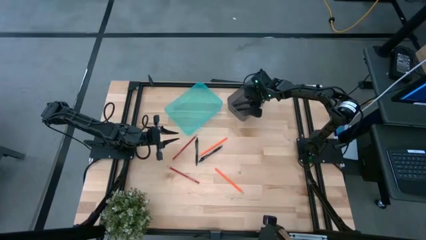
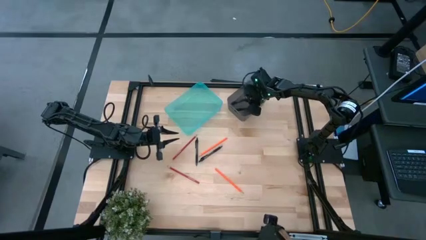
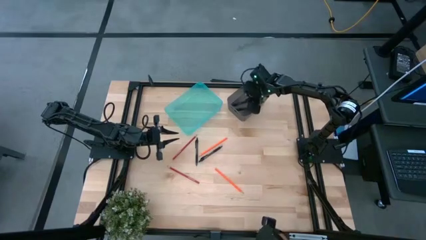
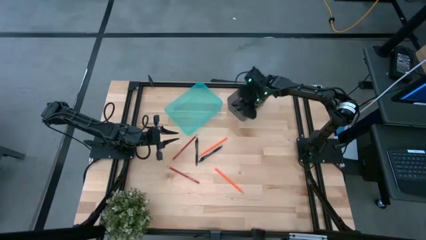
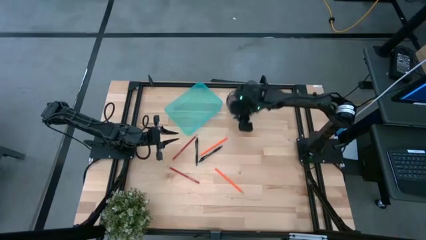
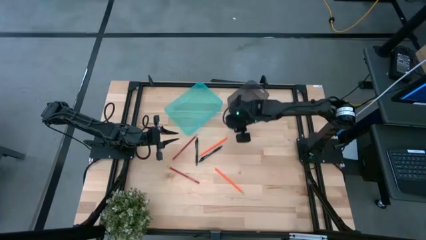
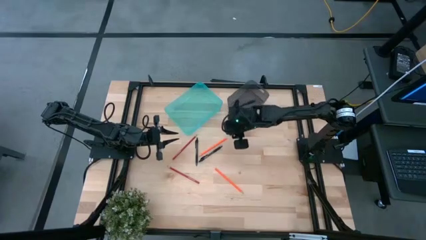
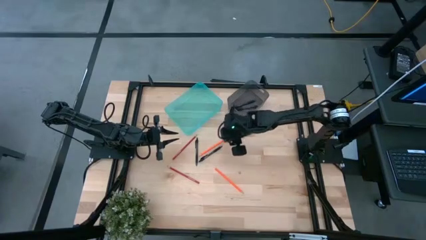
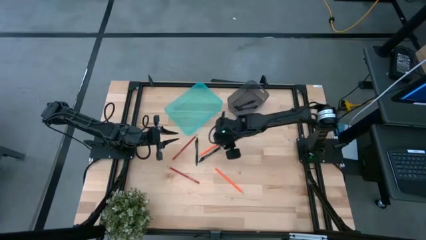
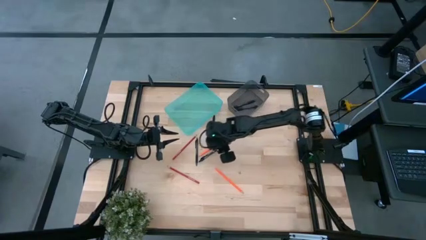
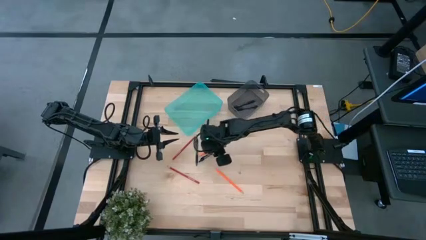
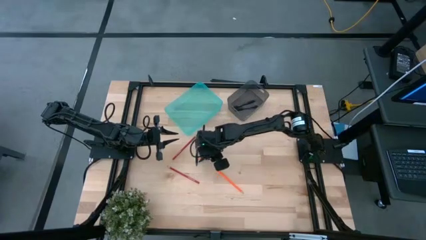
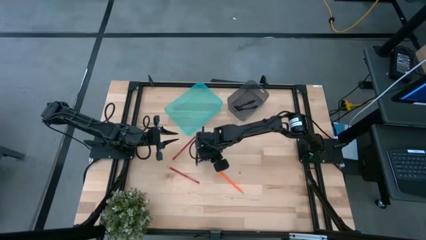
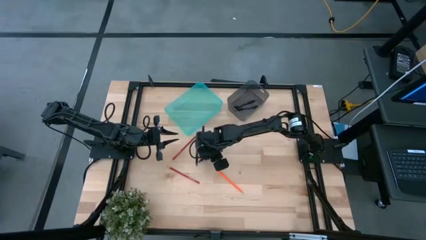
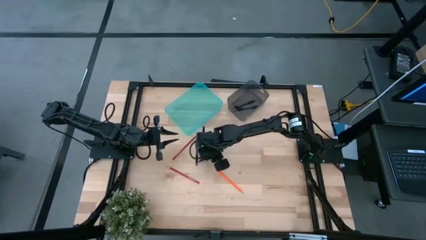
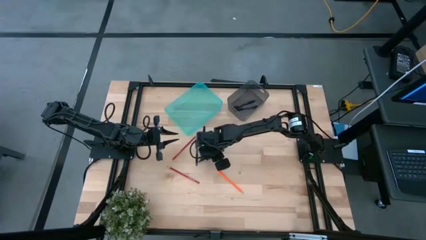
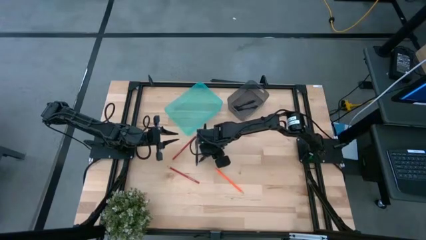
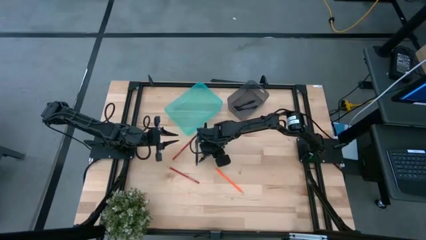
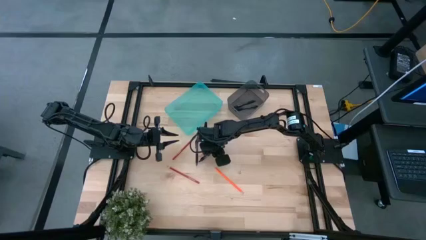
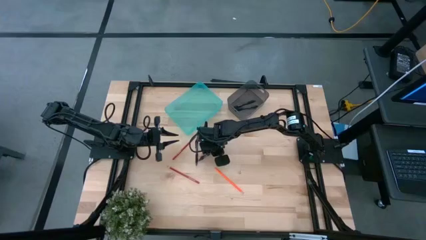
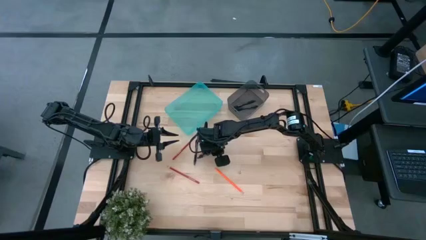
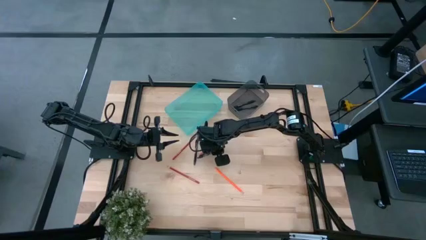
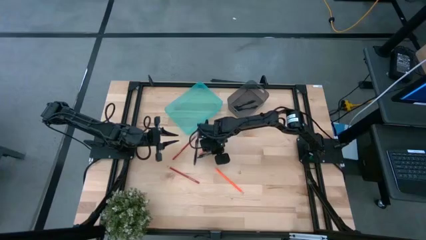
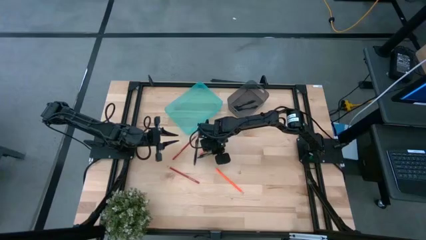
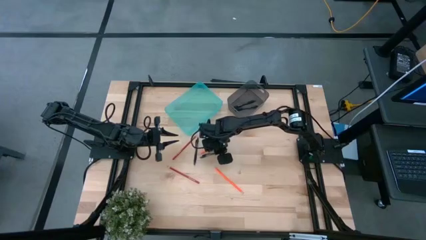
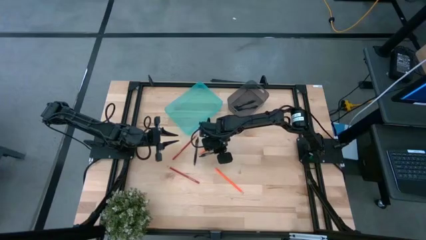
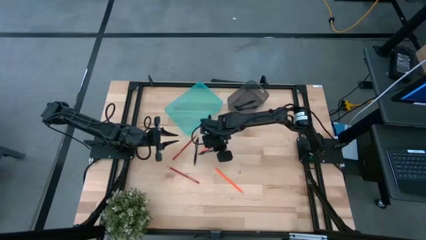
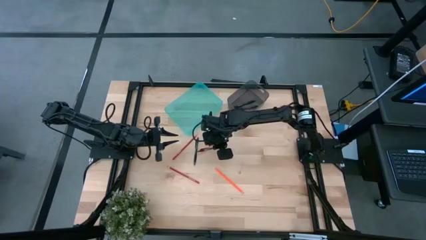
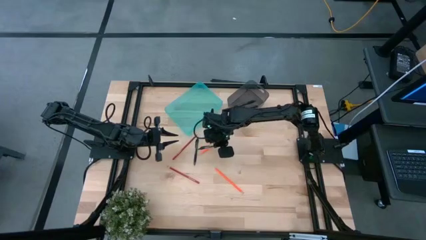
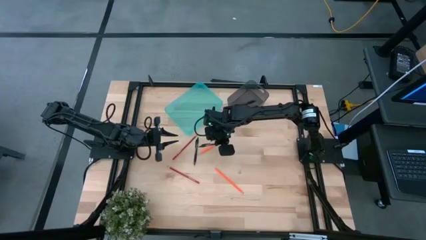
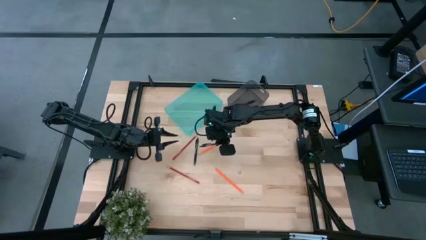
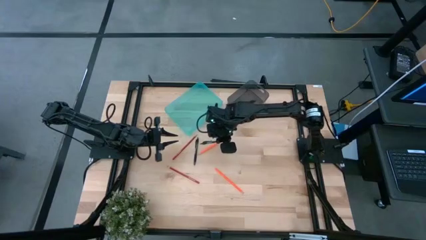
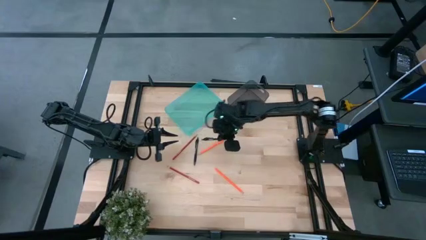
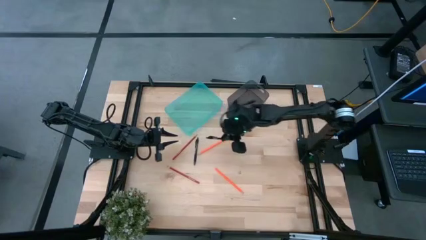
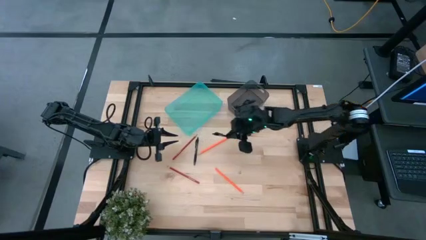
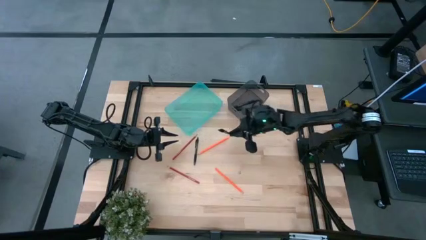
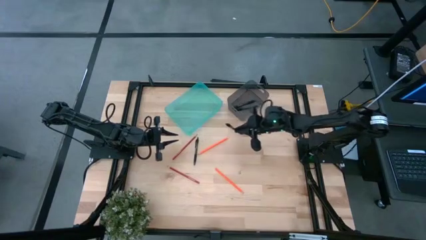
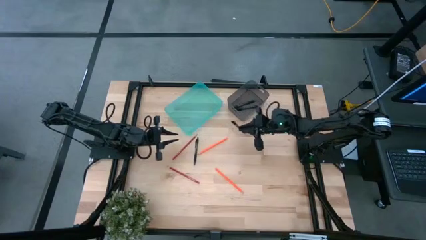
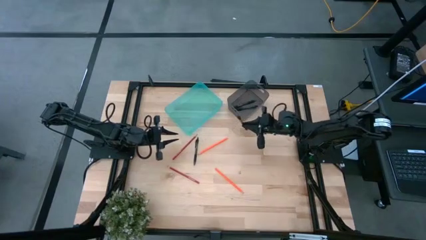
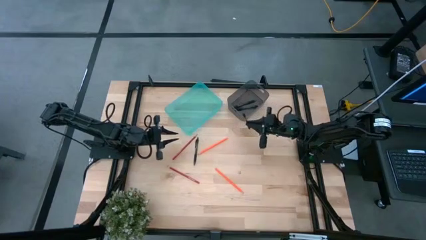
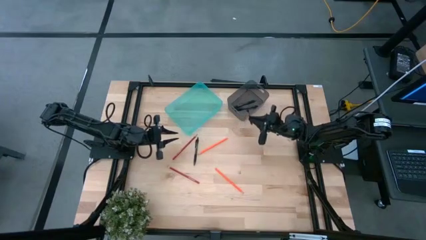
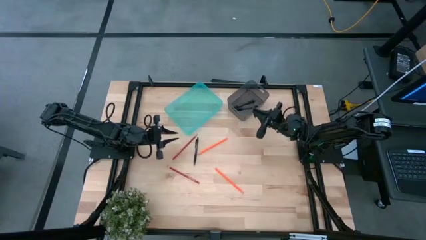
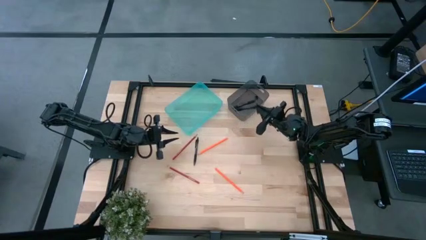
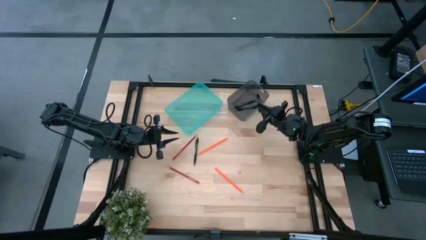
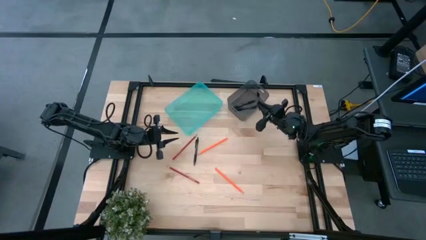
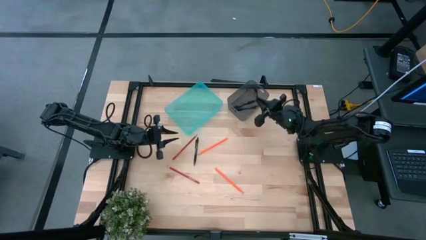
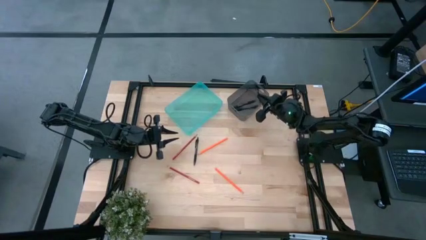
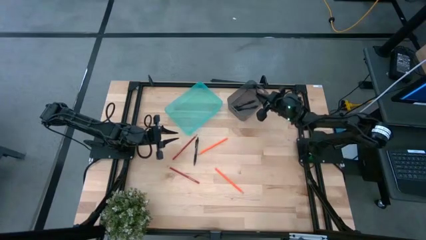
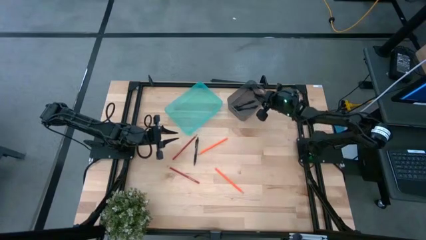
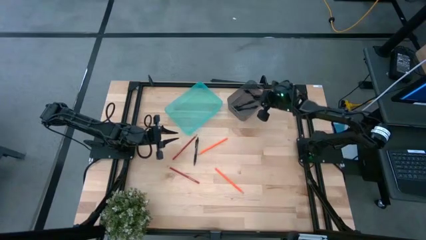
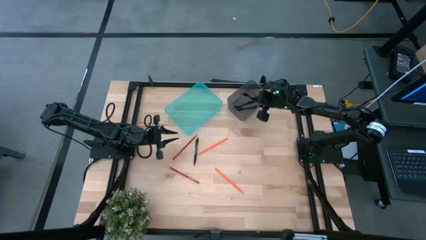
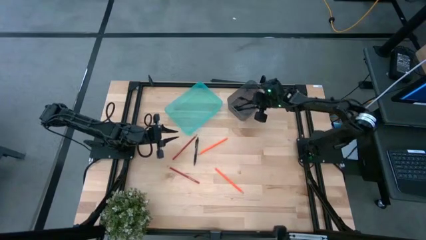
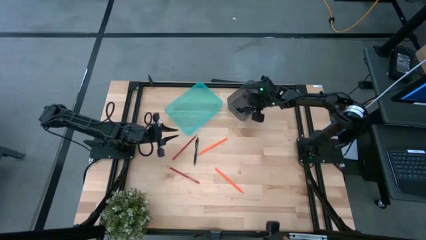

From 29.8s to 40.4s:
Task: Sort pens & pencils
Put the black pen into the gray bin

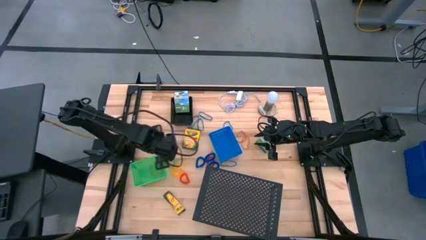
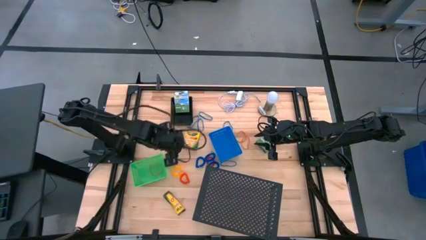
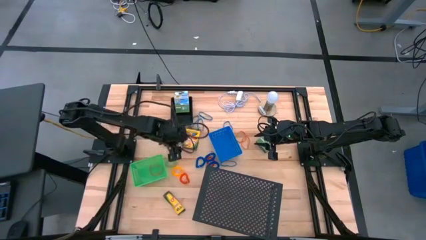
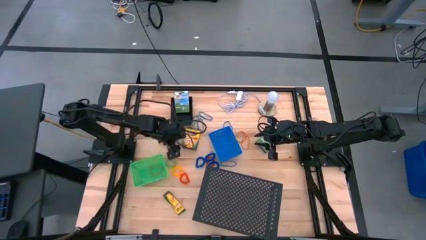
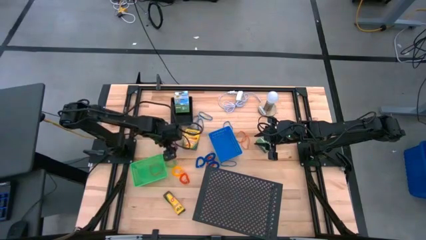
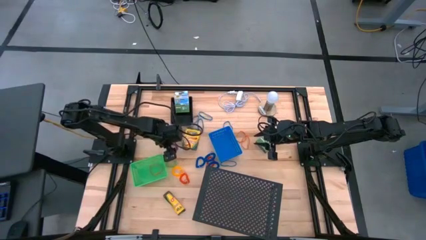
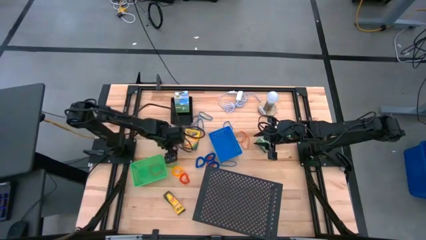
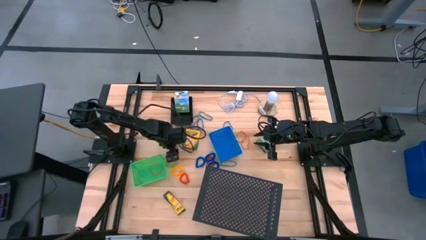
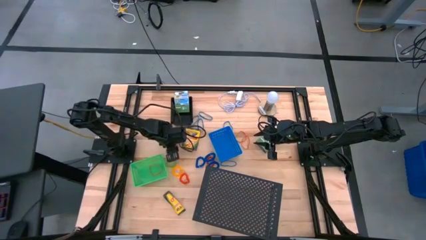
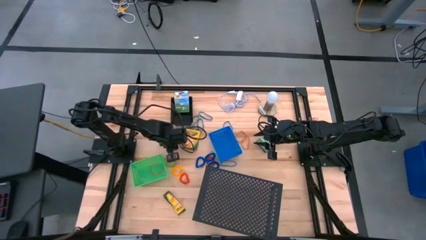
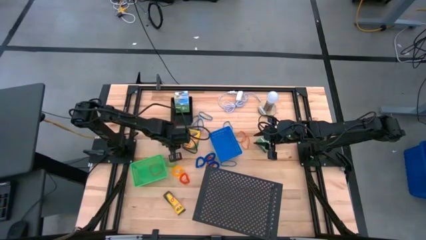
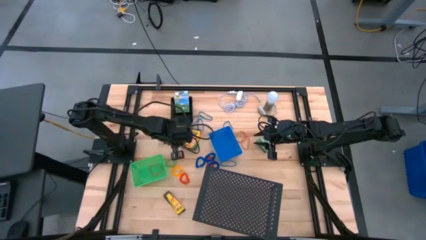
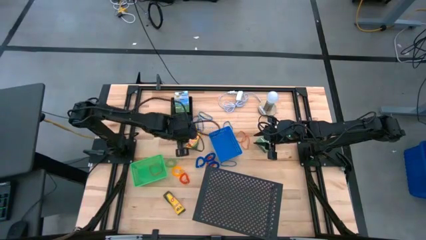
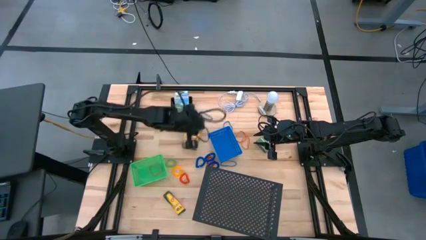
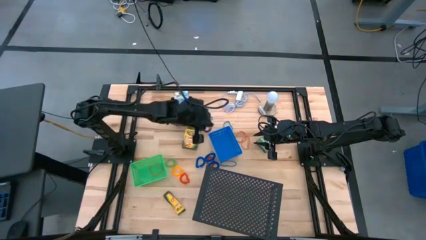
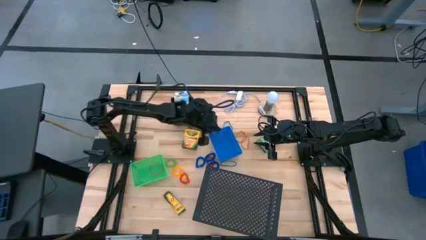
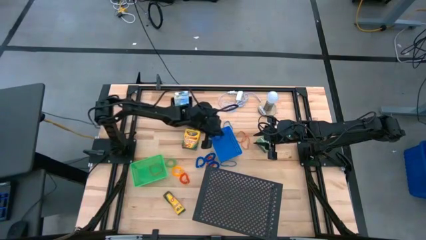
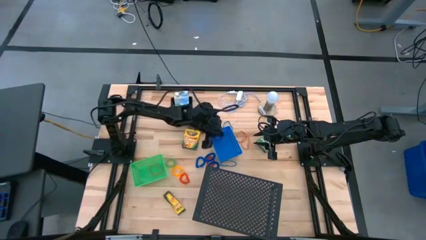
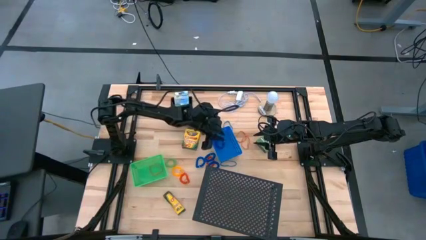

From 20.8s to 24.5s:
Task: Pick & Place Office Desk Supplies
Put the violet key band into the blue bin

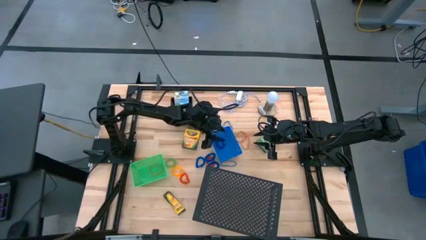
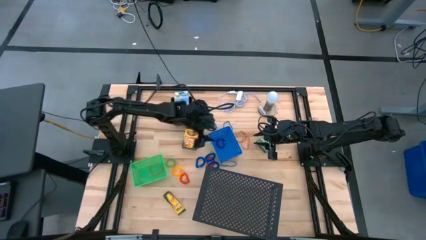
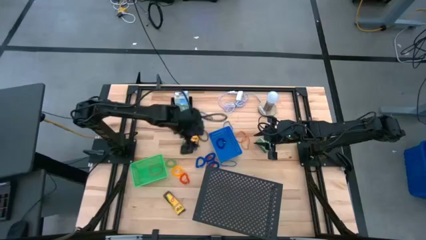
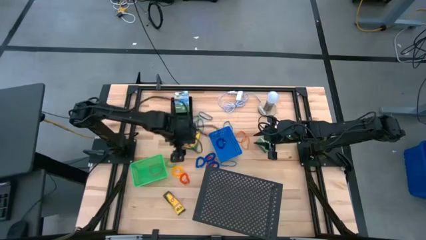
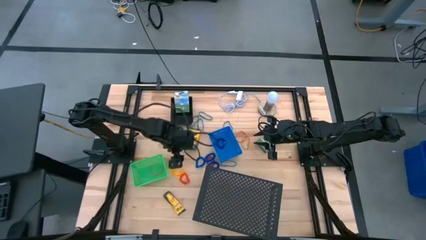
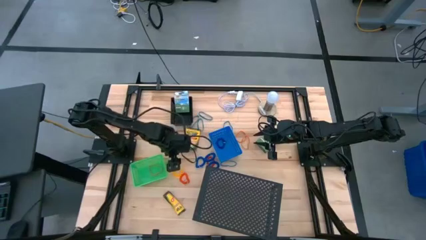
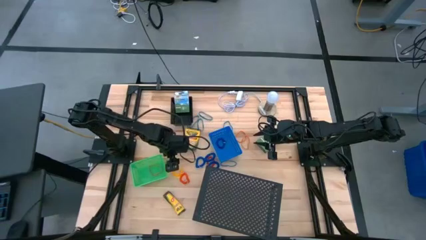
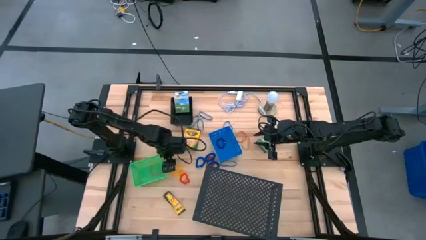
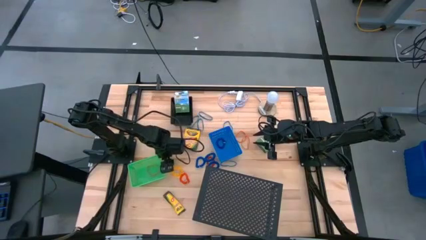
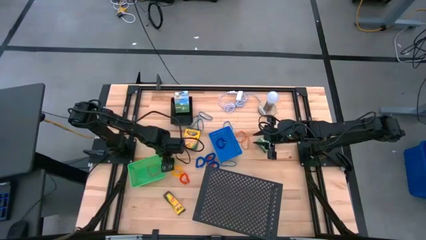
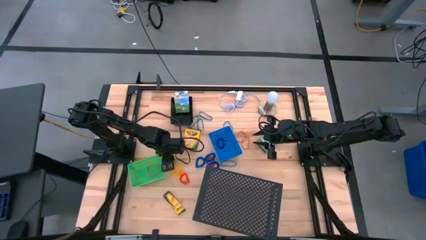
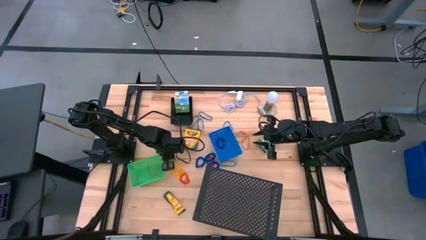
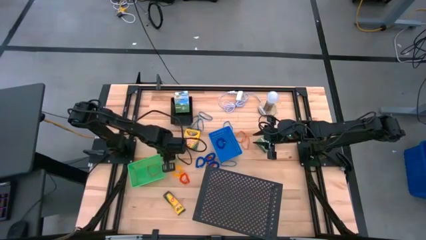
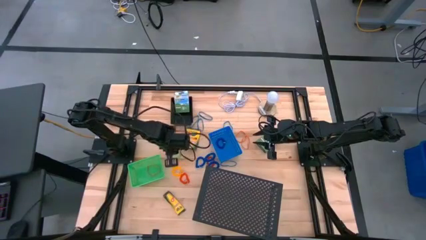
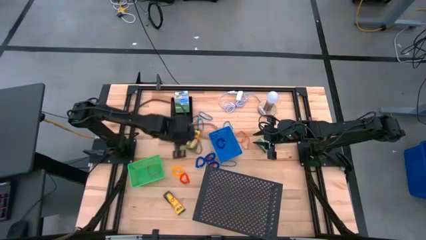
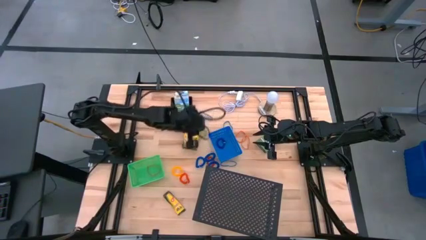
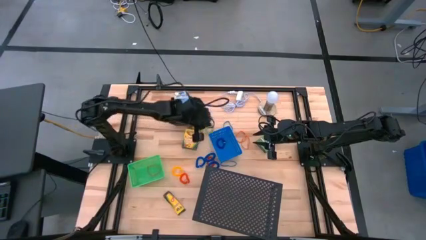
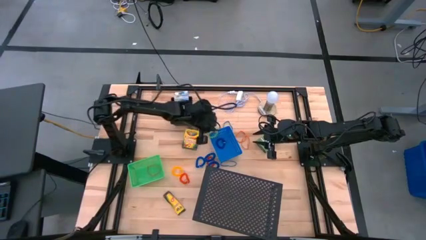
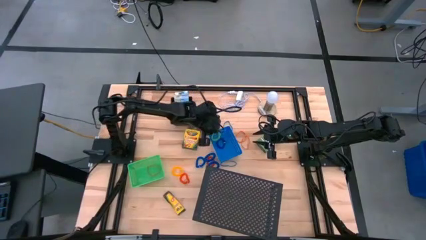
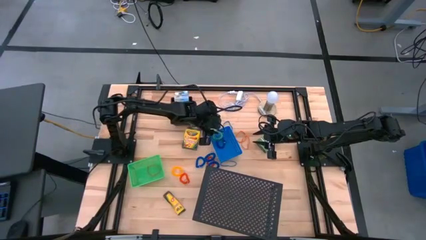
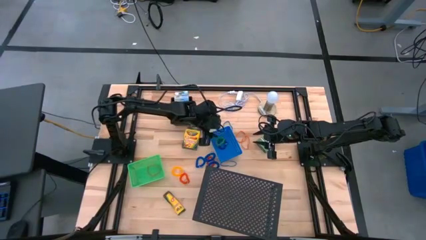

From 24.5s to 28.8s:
Put the green key band into the blue bin
